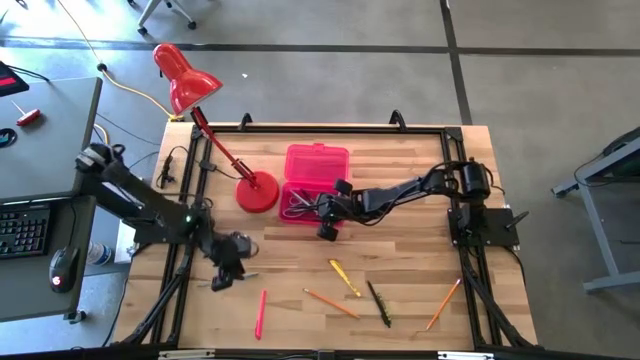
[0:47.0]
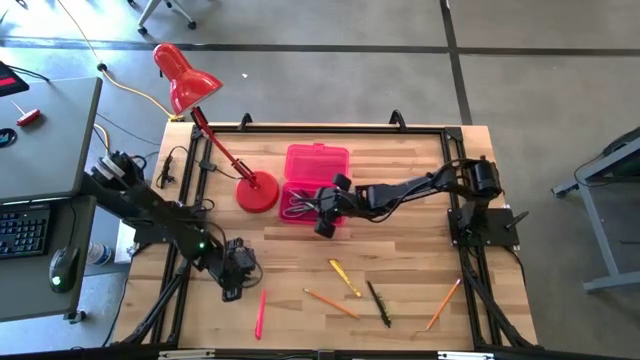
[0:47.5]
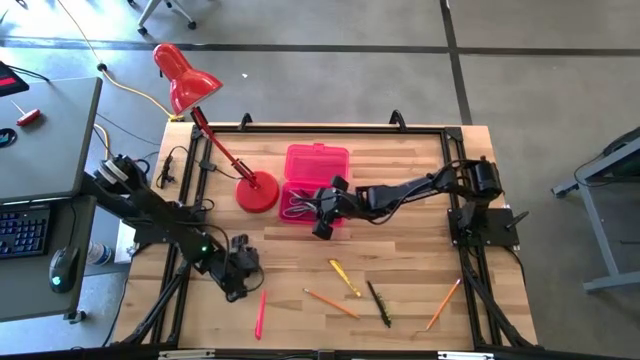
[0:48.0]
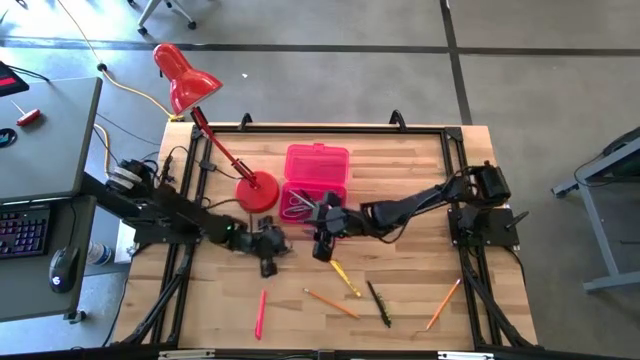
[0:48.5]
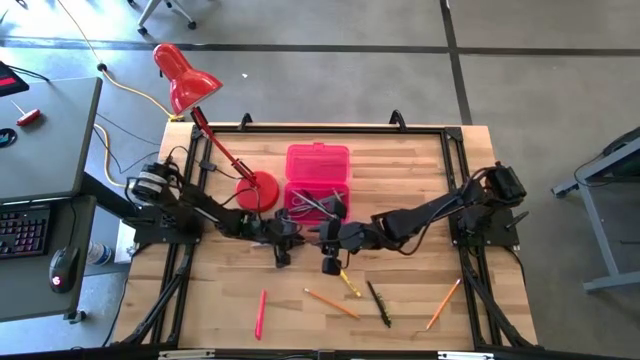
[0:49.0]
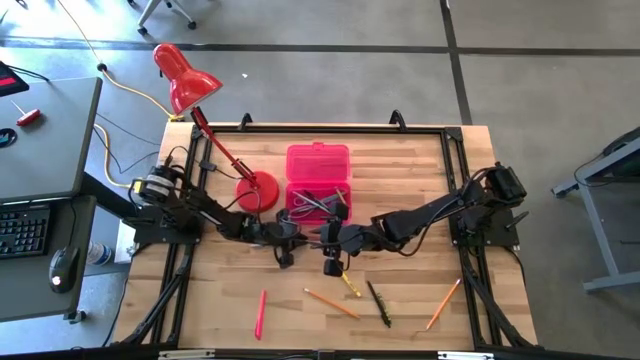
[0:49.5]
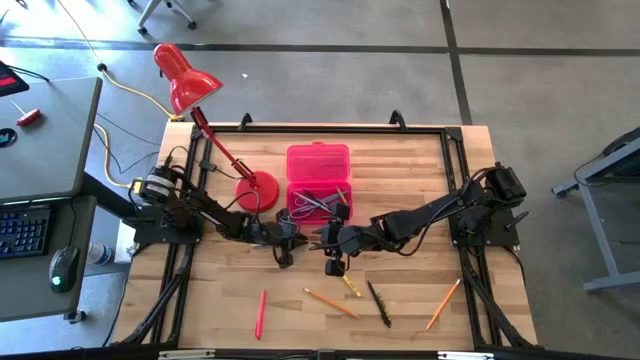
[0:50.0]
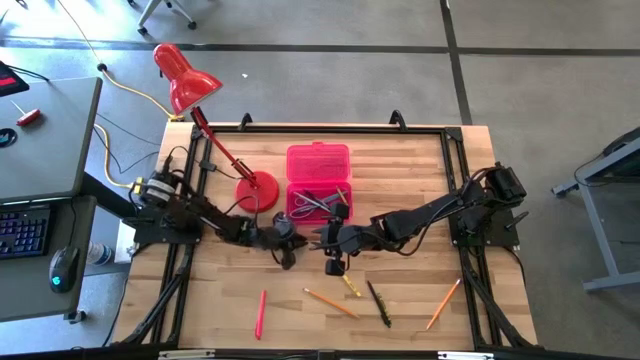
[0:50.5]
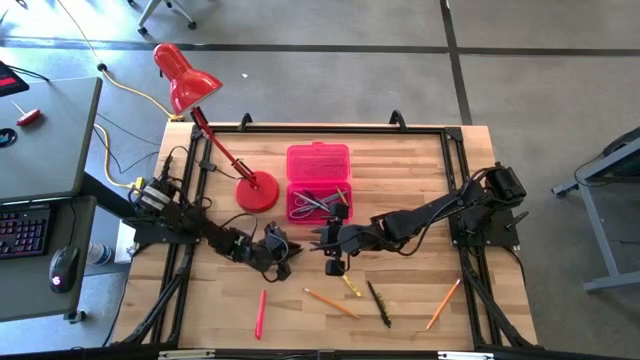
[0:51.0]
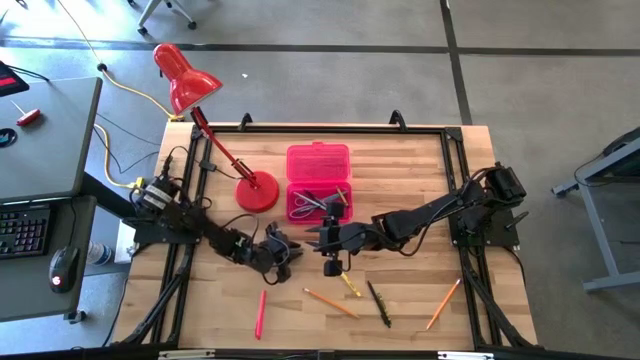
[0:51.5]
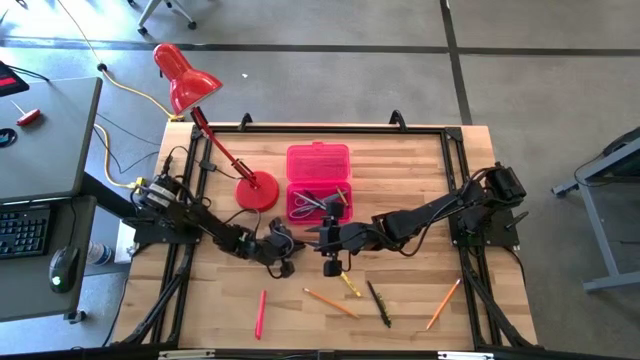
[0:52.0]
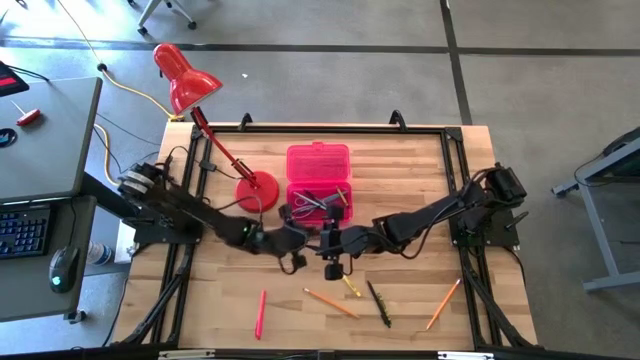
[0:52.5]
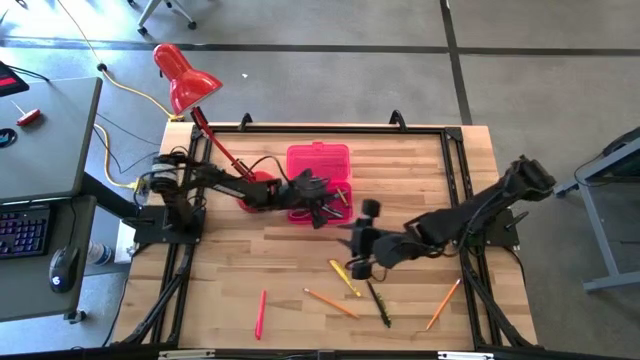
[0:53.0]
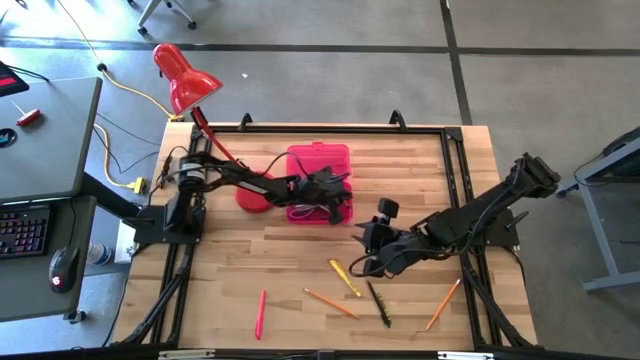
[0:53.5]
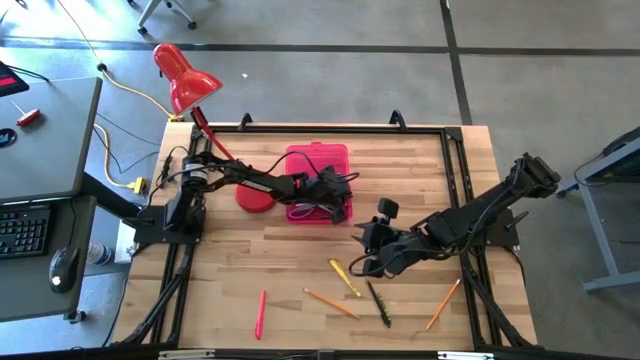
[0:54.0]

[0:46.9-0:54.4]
Task: Pick & place school supplies into a supply box
Put the light blue pencil into the pink supply box

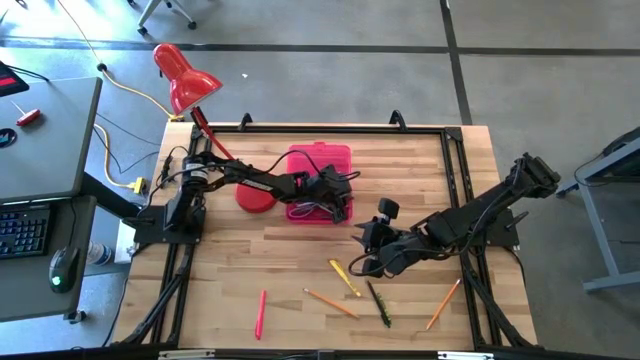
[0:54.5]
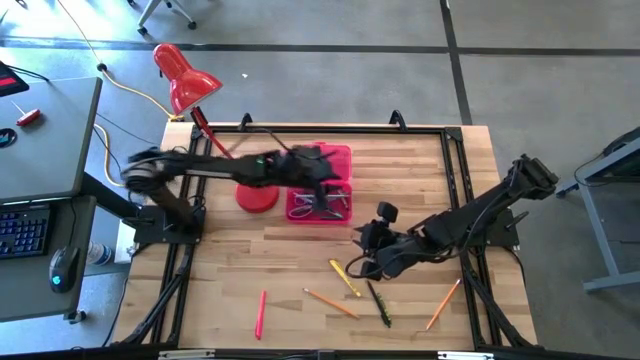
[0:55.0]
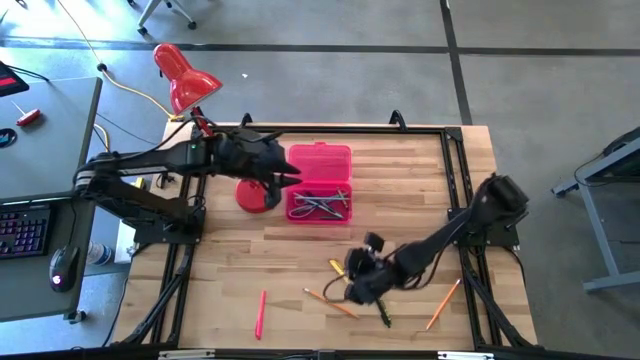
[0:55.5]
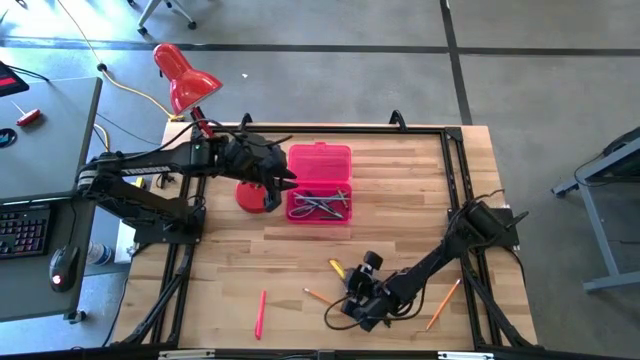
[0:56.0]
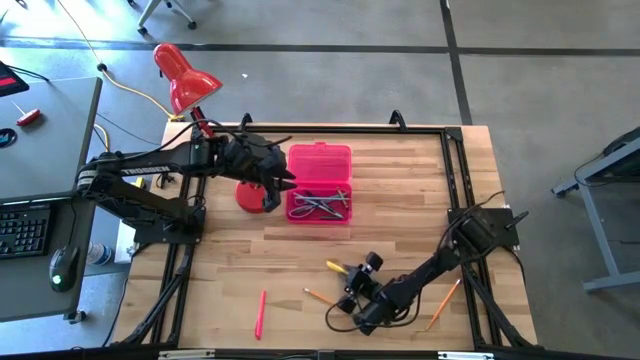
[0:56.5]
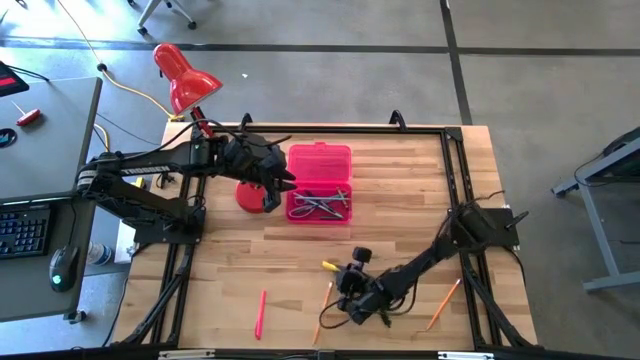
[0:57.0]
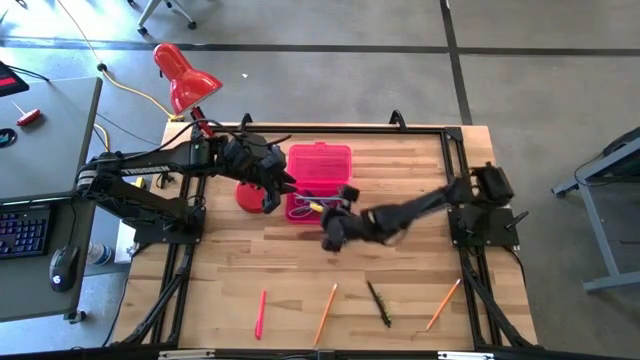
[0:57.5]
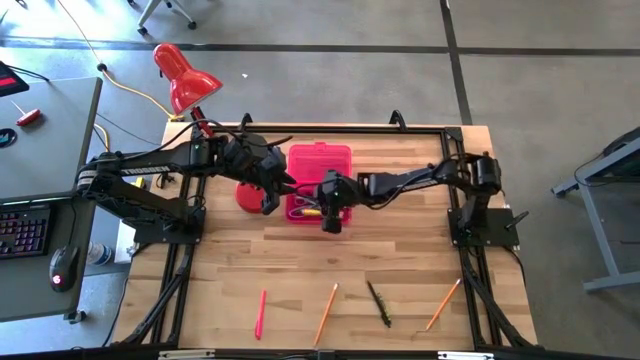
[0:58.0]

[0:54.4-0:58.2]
Put the yellow pen into the pink supply box

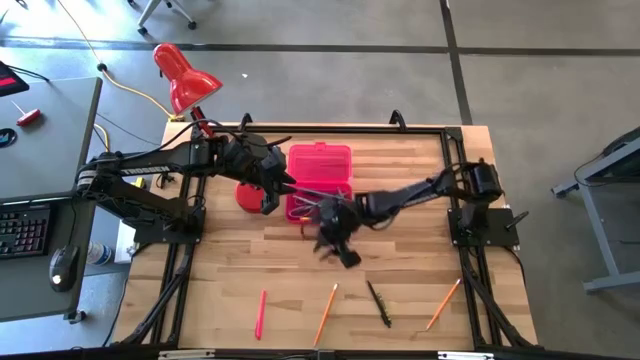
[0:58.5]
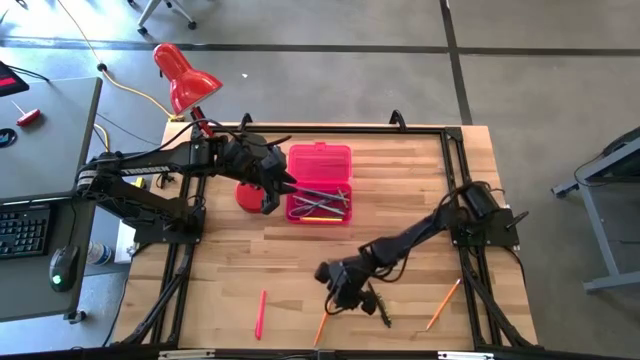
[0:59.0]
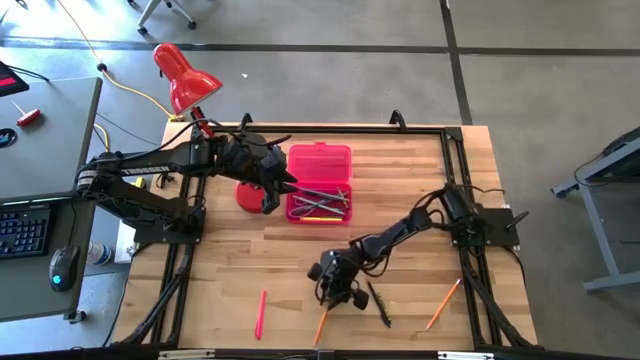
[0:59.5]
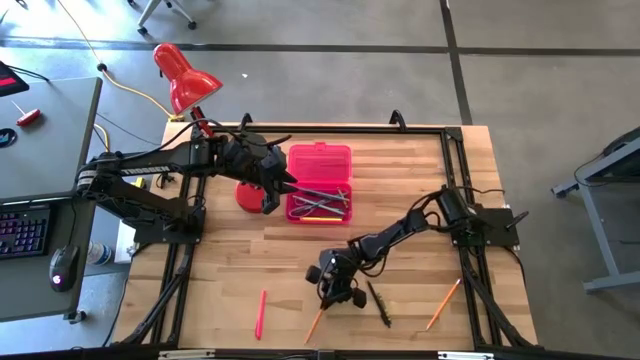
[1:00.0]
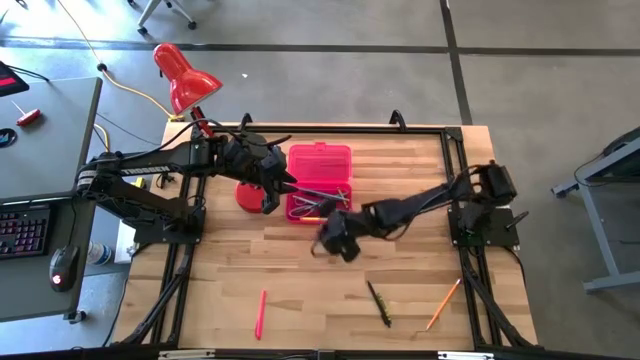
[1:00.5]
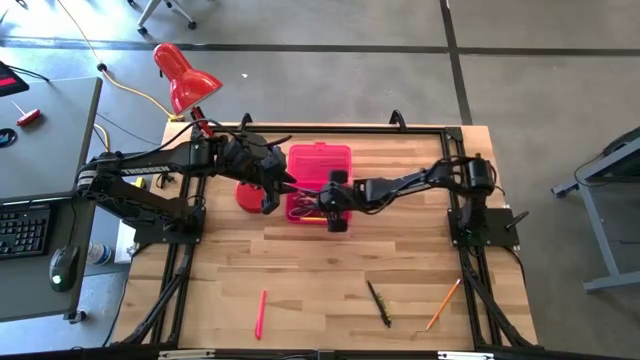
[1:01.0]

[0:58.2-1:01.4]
Put the left orange pencil into the pink supply box

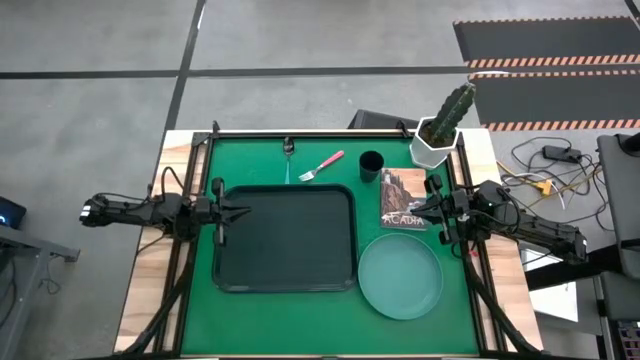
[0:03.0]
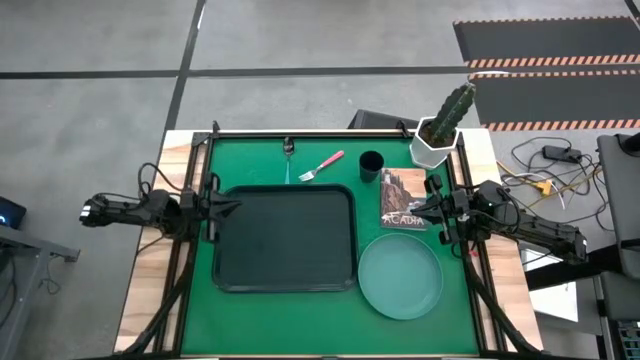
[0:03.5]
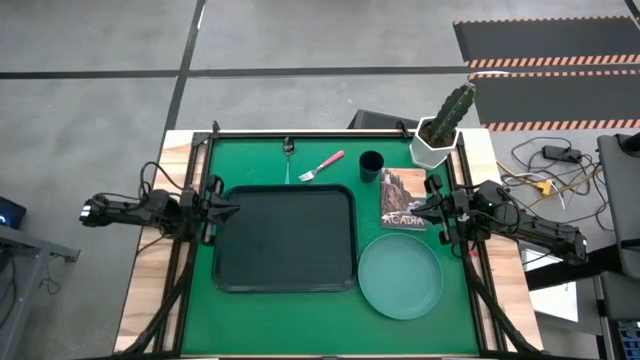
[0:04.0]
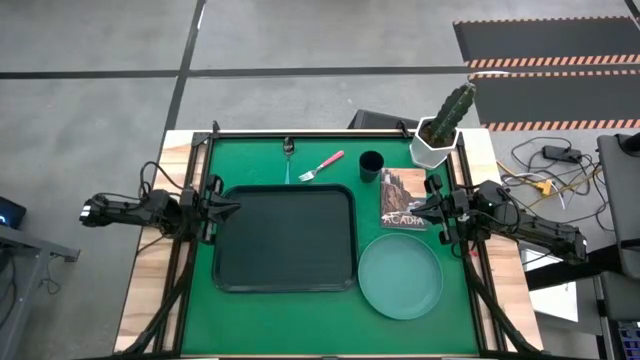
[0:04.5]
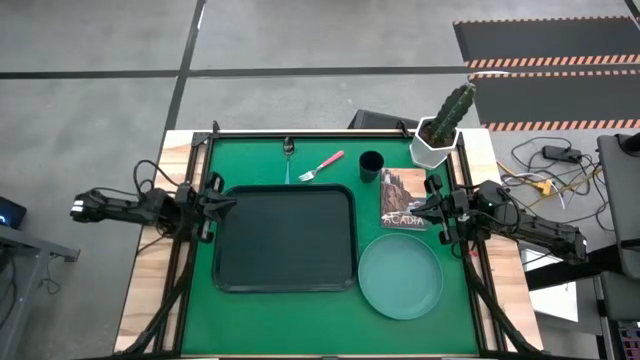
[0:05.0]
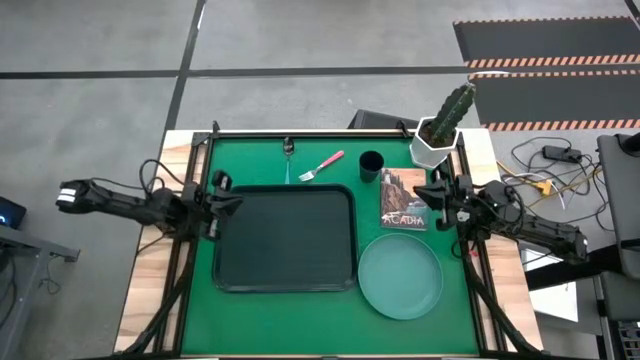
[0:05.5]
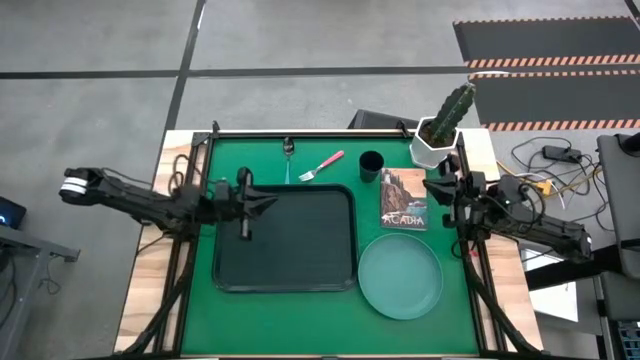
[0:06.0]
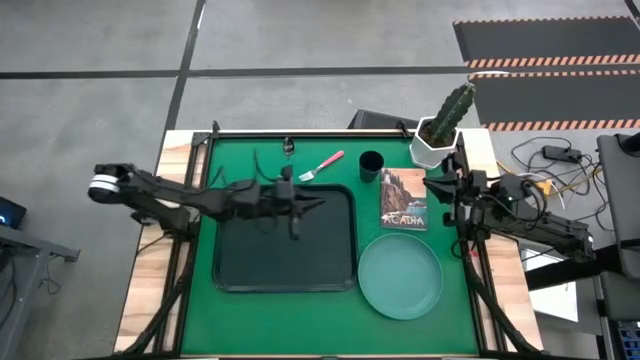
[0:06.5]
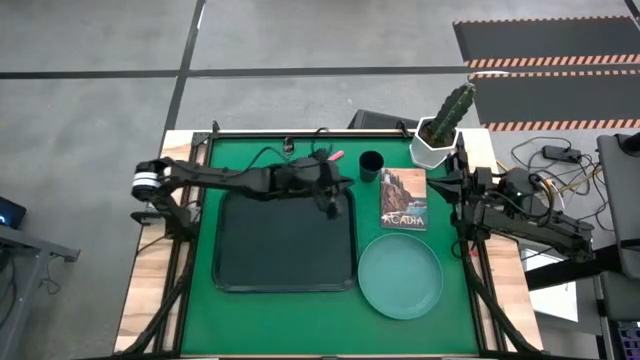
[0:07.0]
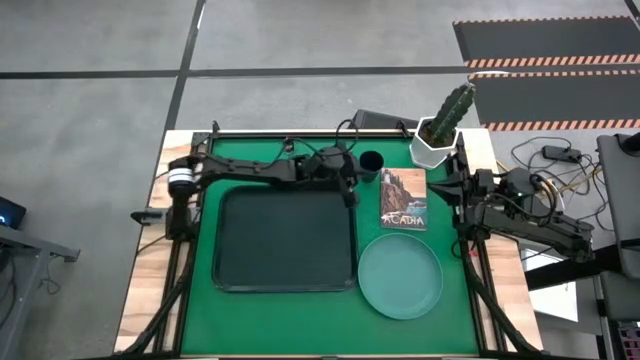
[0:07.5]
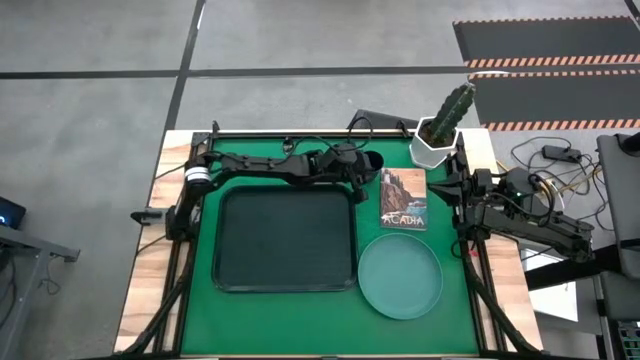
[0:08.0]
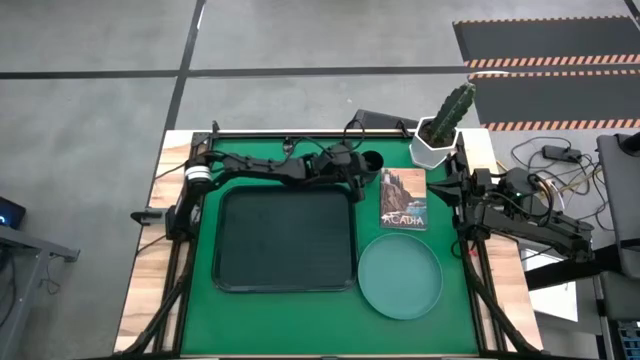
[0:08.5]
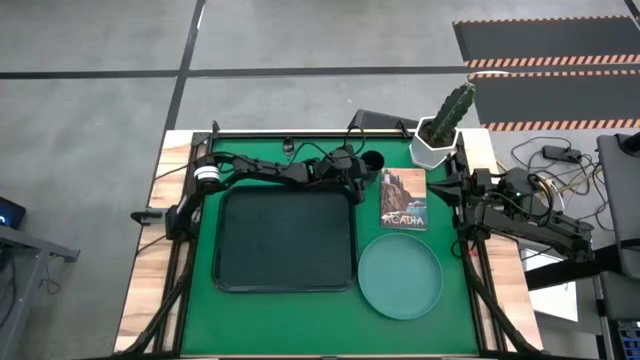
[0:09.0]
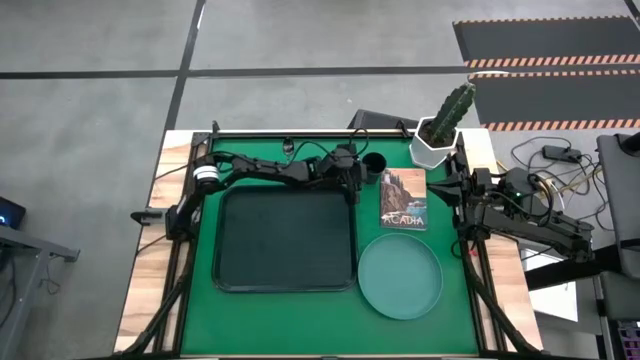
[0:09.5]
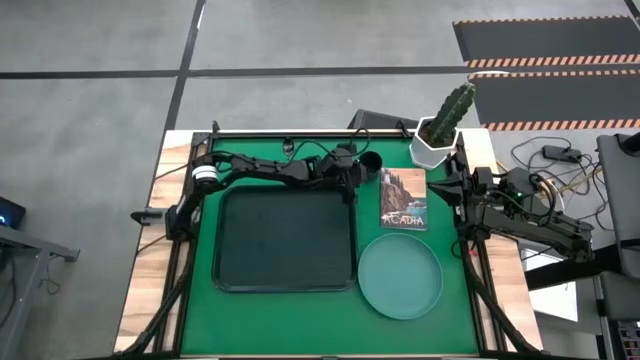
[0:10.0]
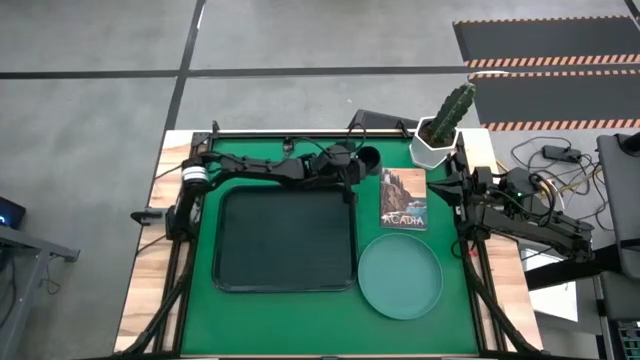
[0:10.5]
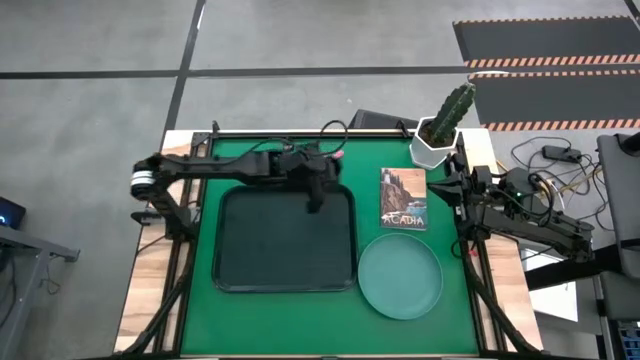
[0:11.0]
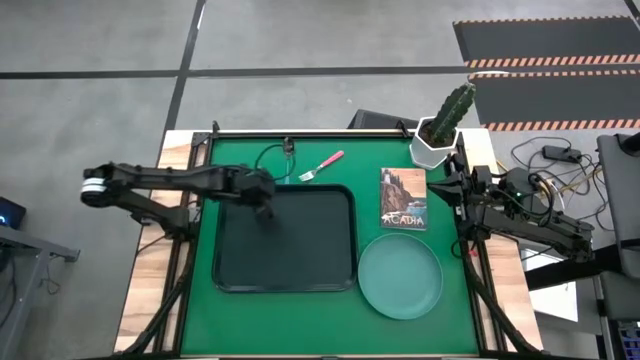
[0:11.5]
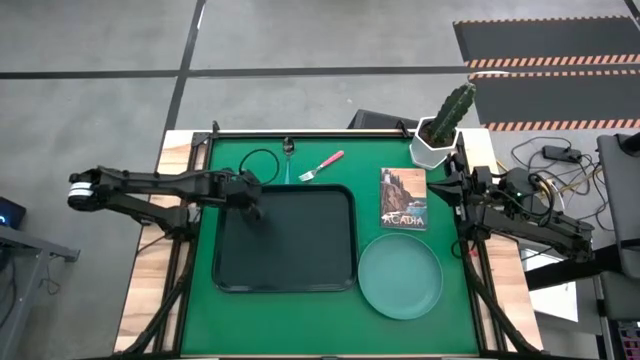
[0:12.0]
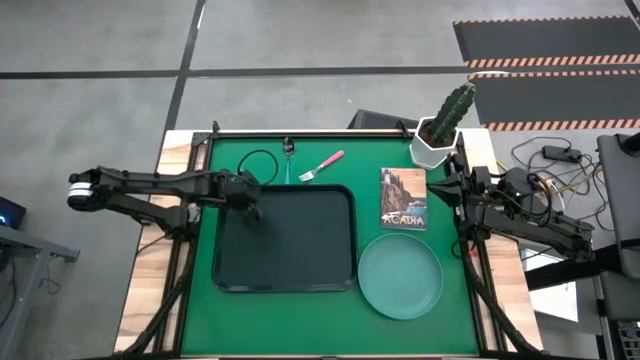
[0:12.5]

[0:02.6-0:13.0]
Task: Pick and place plate/cup/fork/spoon on tray
Put the dark blue cup on the black serving tray
